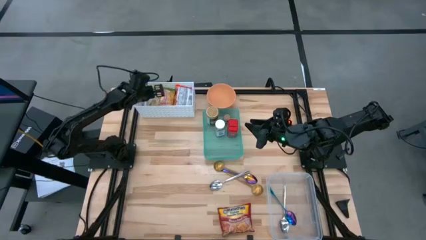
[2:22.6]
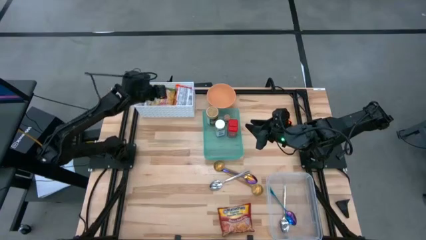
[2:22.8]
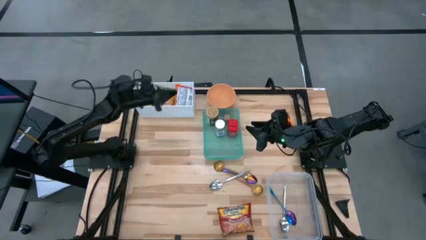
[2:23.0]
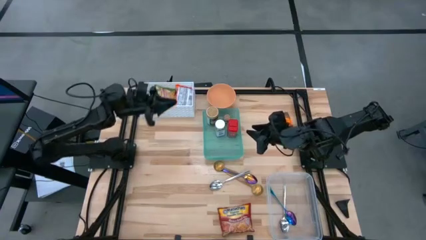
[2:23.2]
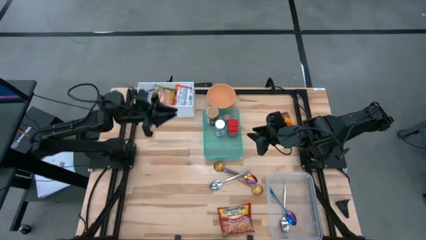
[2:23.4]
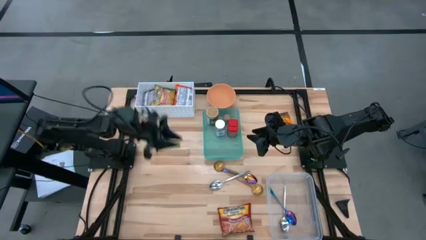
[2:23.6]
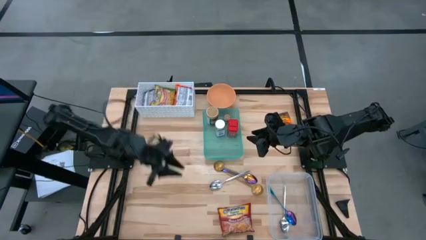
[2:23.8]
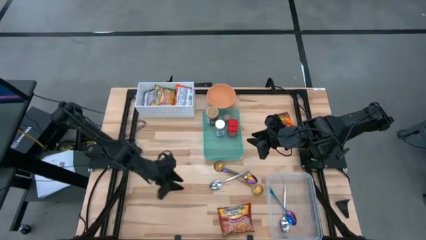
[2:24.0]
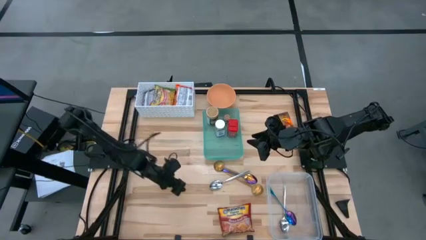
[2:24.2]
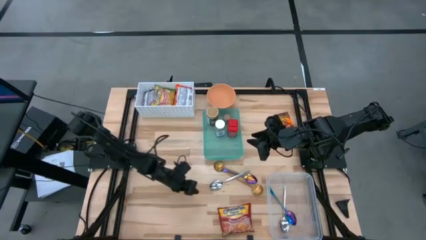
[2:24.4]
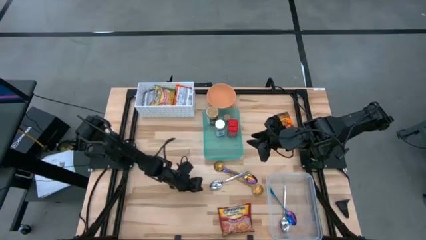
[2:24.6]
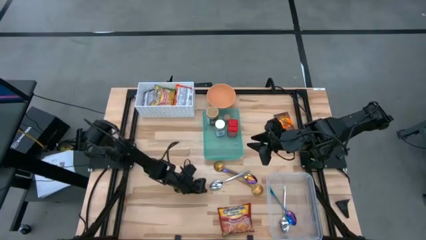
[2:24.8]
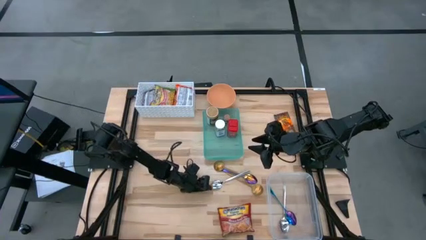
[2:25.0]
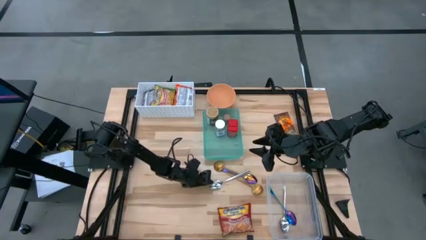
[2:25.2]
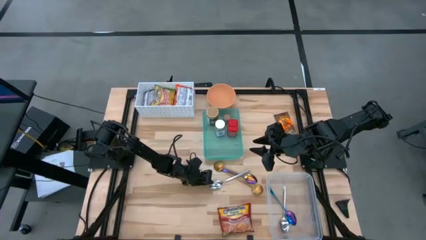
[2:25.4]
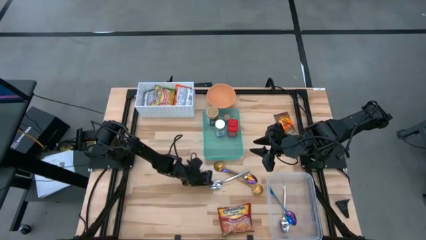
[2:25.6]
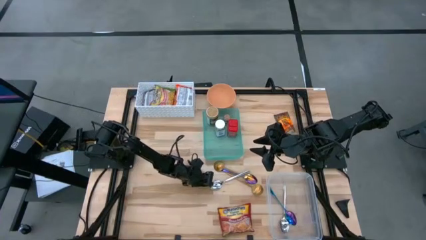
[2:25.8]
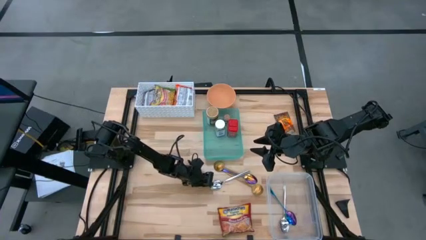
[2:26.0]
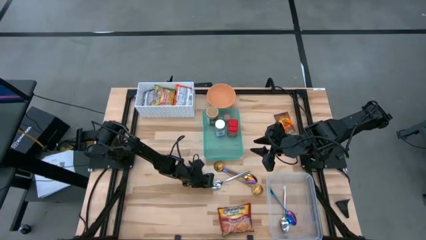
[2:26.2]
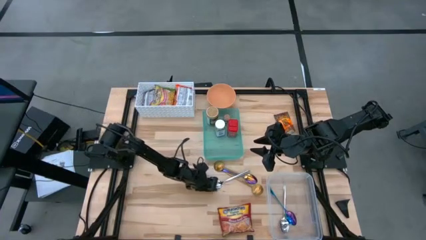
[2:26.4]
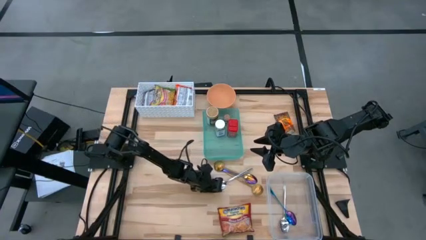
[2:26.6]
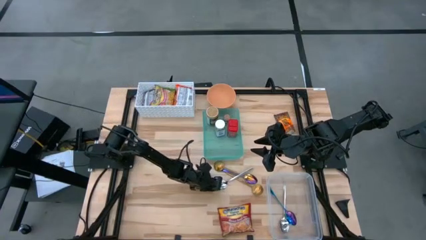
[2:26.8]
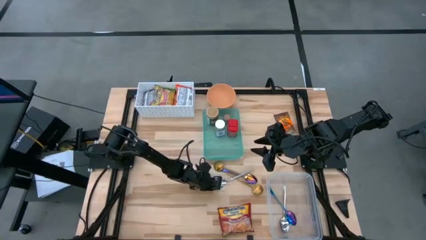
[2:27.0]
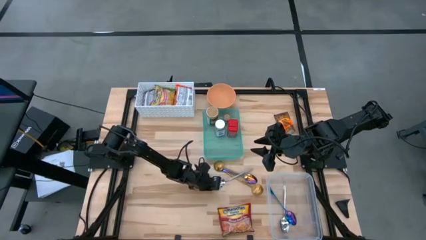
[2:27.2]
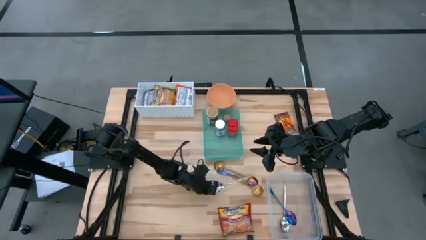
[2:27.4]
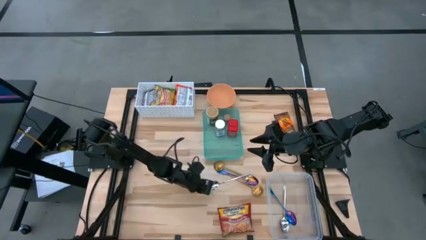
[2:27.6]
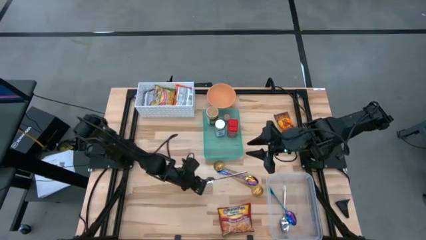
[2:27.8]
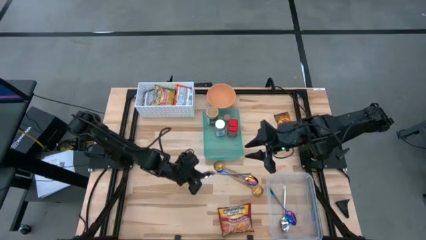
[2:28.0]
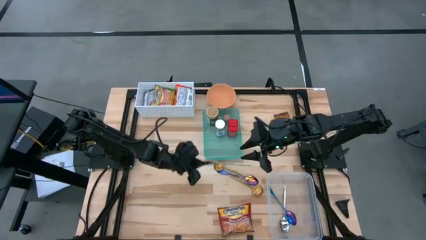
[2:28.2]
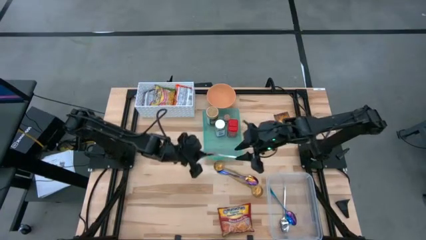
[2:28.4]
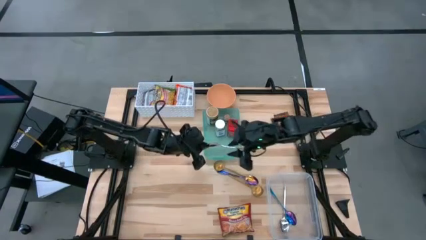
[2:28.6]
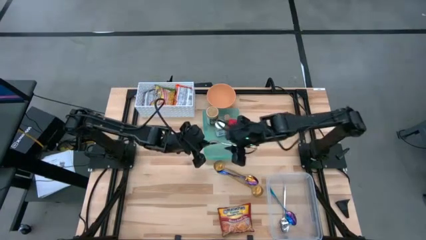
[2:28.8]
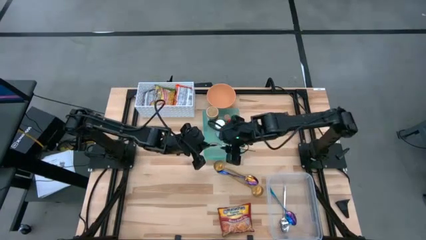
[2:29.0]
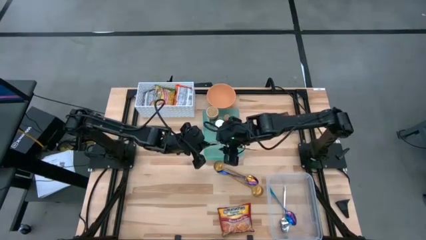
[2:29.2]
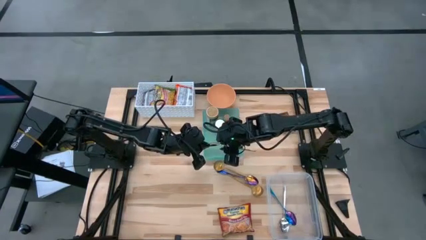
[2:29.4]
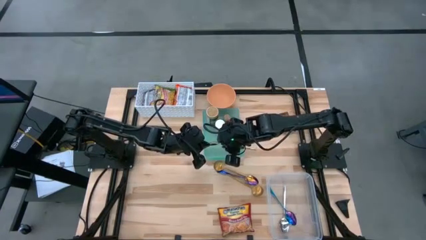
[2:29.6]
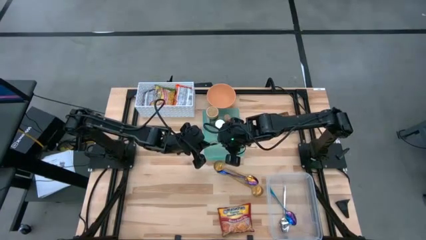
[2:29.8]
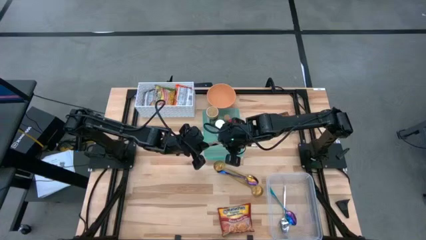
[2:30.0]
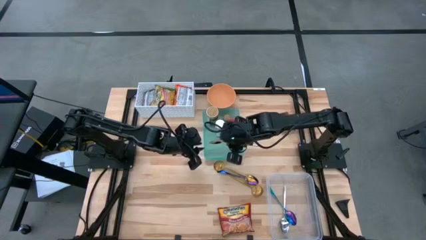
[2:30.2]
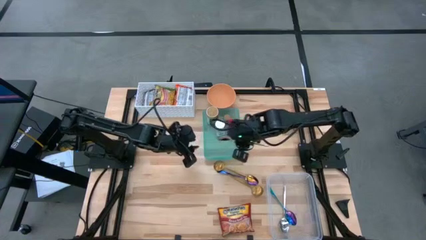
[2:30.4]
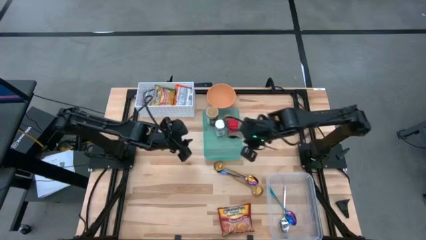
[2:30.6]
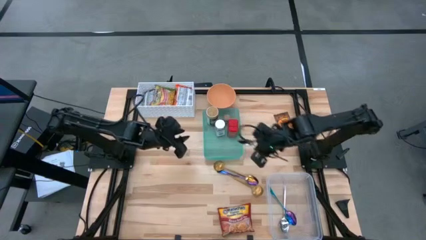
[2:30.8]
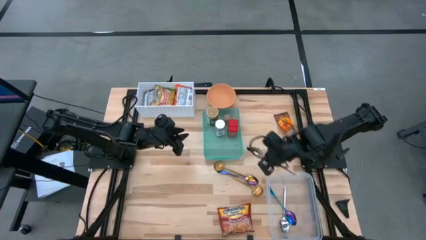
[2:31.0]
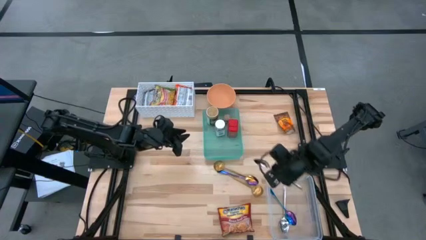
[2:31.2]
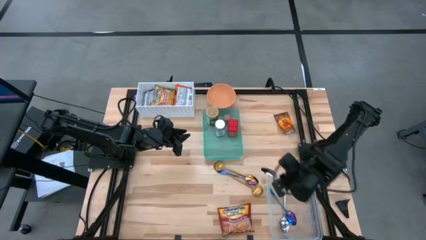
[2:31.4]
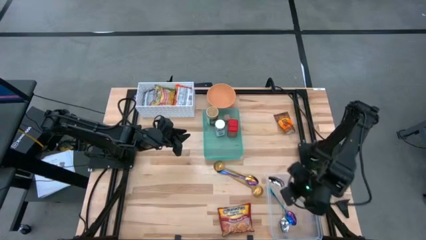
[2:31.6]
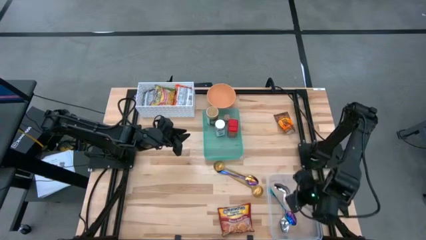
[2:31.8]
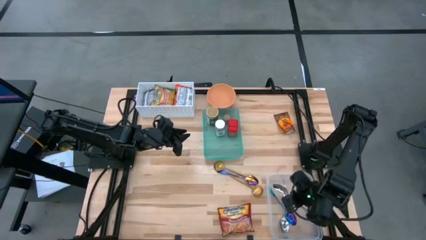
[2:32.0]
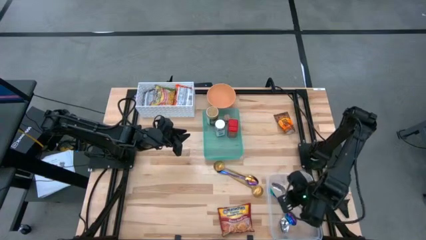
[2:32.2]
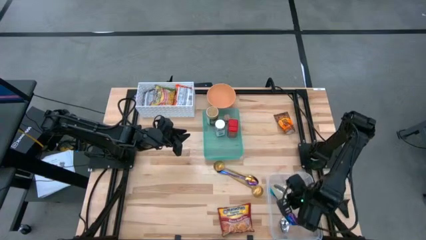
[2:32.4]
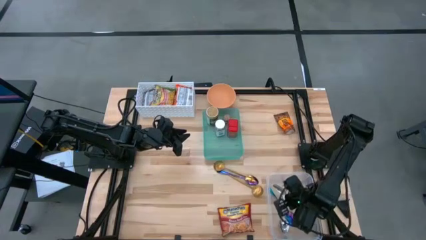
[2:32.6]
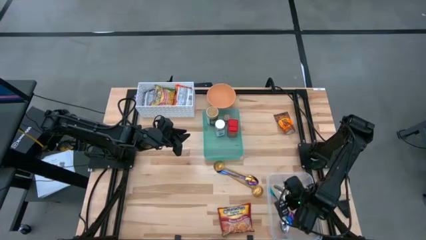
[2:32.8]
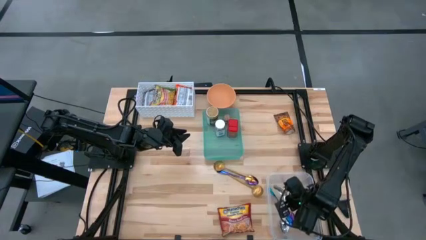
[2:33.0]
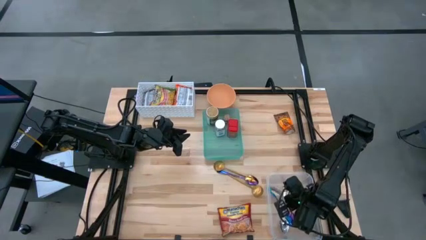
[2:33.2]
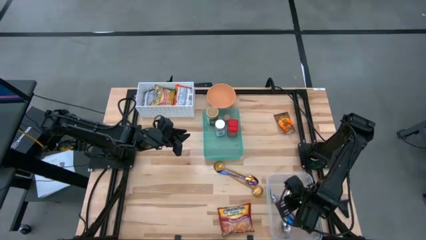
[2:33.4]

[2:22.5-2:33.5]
Task: Pick & Place Food Item
Put the silver spoon into the transparent bin

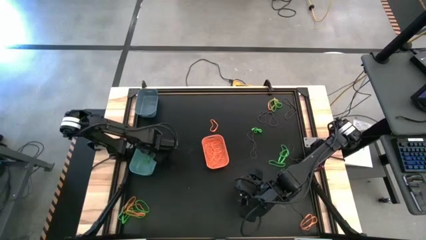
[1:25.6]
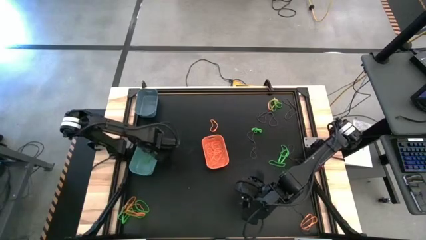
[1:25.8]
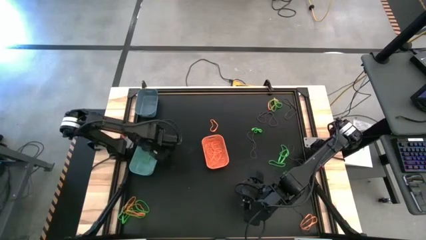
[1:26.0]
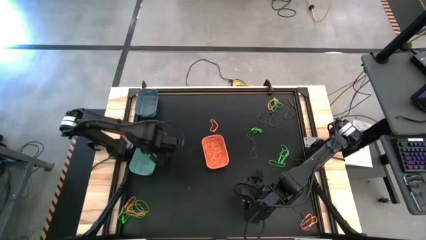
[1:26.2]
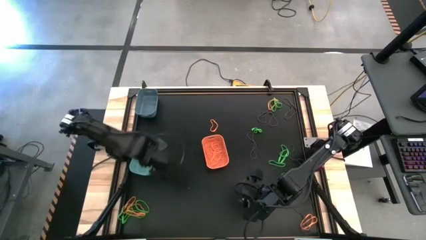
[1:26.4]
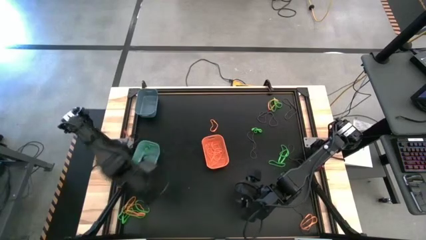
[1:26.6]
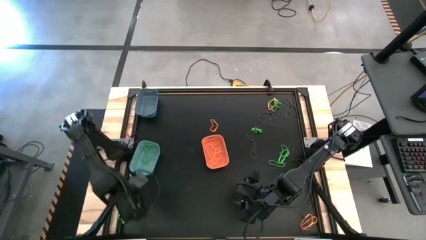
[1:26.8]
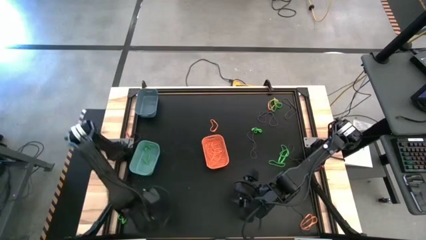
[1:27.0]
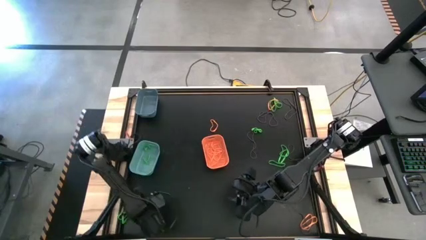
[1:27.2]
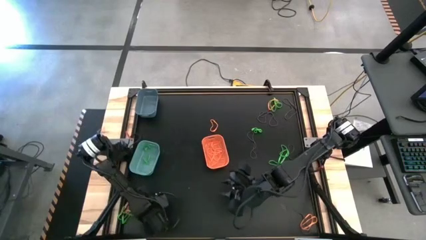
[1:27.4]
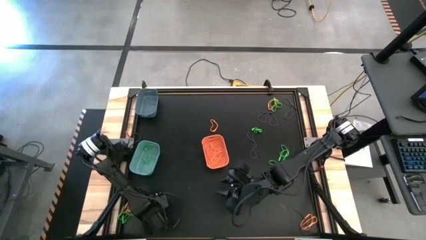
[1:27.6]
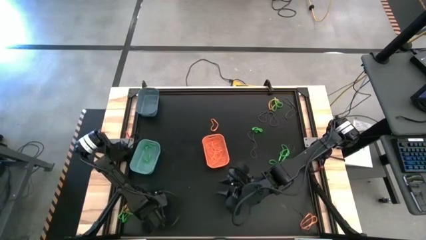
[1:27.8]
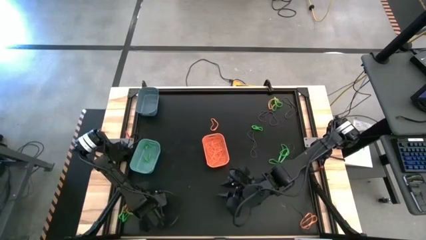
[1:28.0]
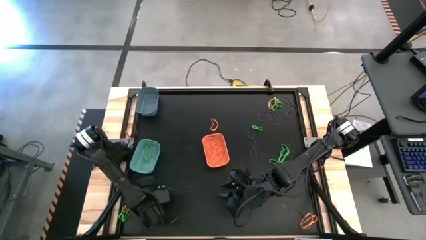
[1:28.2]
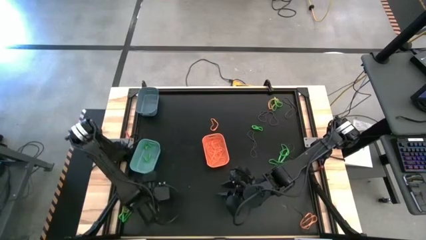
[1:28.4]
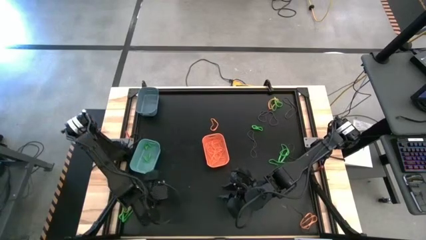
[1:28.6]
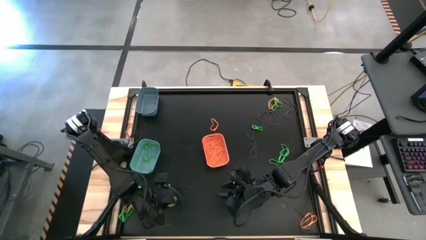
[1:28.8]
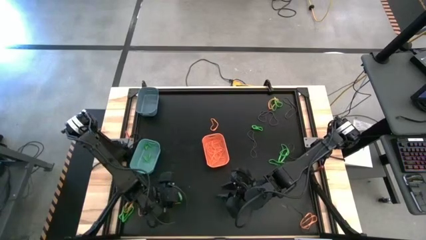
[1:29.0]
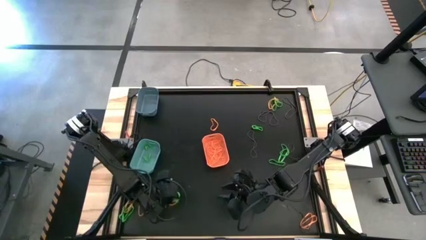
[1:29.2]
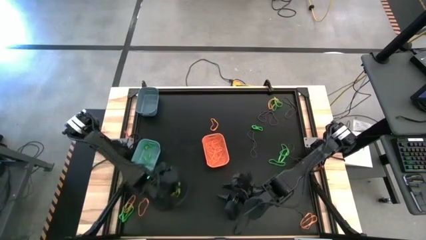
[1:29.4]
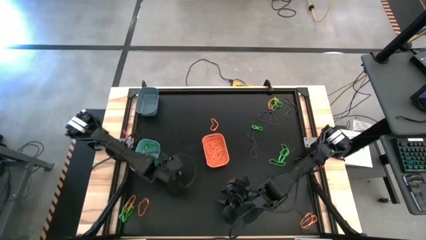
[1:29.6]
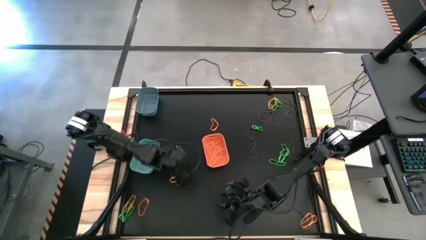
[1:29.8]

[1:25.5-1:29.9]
Task: Sort rubber bands into baskets
Put the green rubber band into the light sea green bin

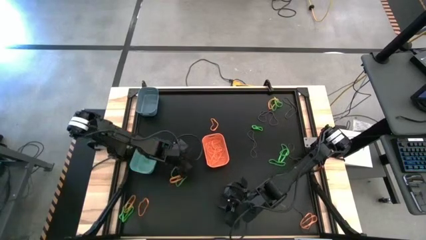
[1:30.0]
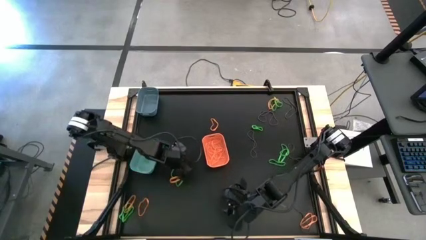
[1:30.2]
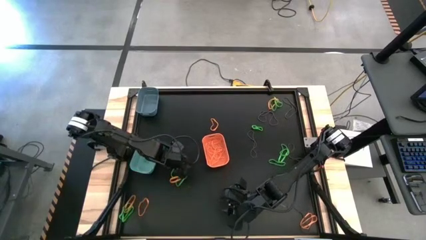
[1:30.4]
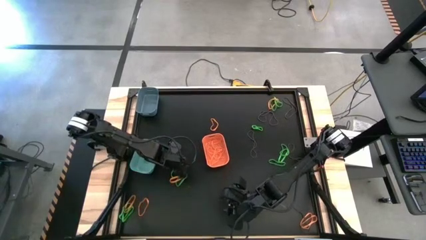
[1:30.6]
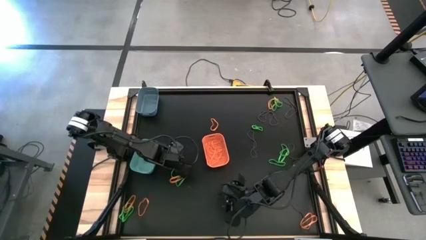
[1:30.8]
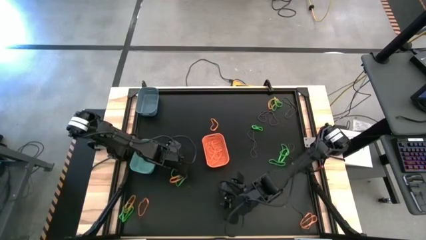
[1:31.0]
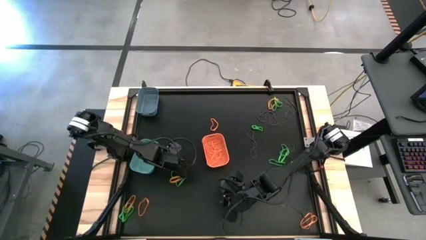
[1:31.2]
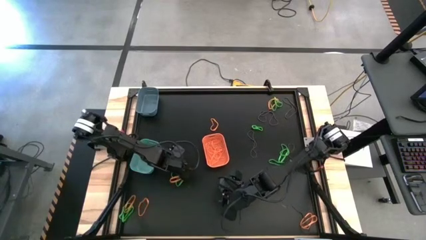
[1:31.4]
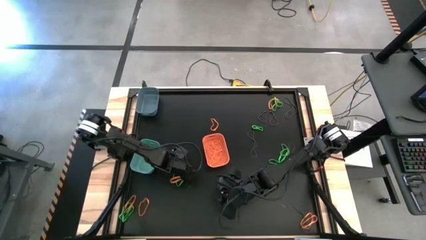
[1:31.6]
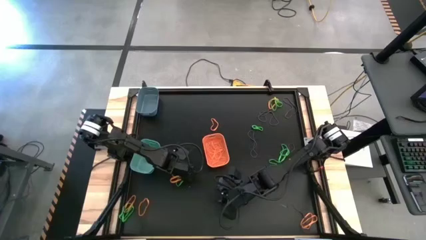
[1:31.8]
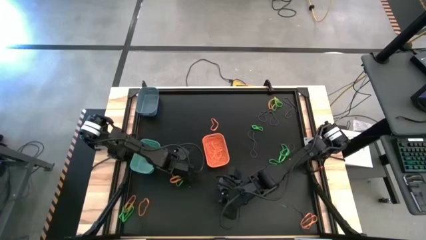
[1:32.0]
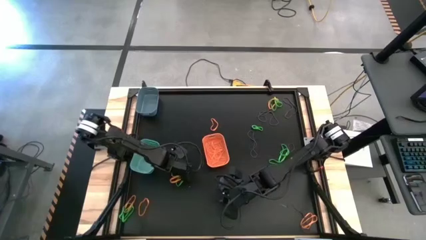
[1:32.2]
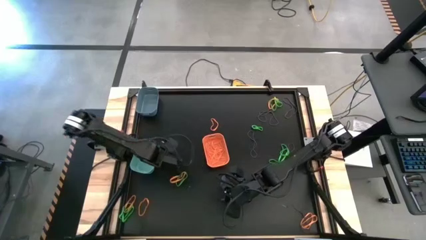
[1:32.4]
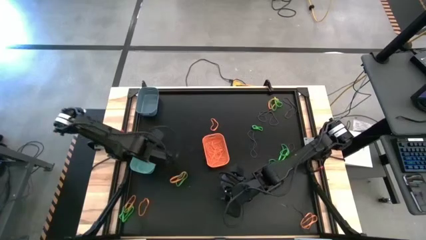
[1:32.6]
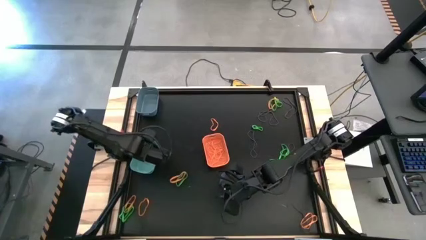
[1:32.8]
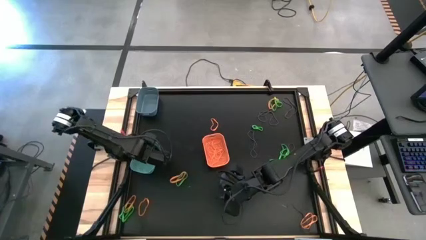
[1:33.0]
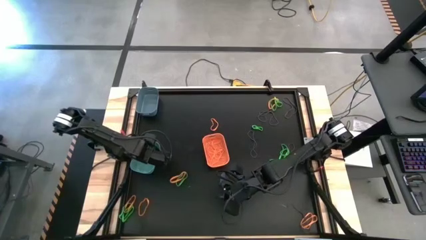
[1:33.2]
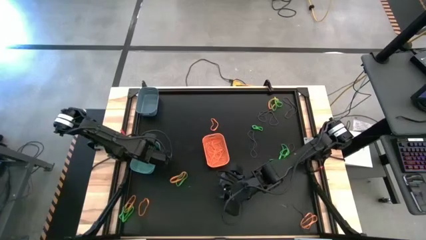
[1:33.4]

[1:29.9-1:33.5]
Put the green rubber band into the light sea green bin
